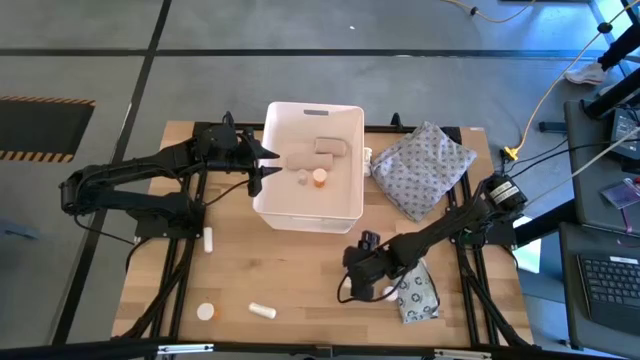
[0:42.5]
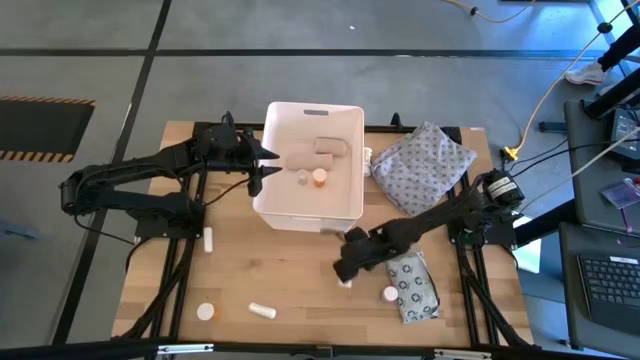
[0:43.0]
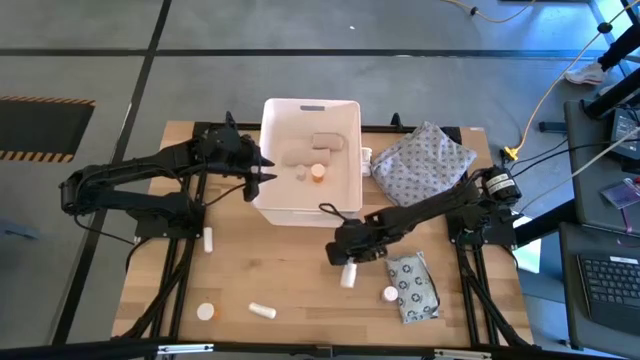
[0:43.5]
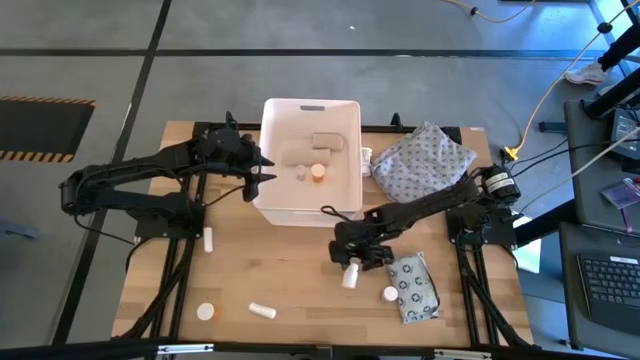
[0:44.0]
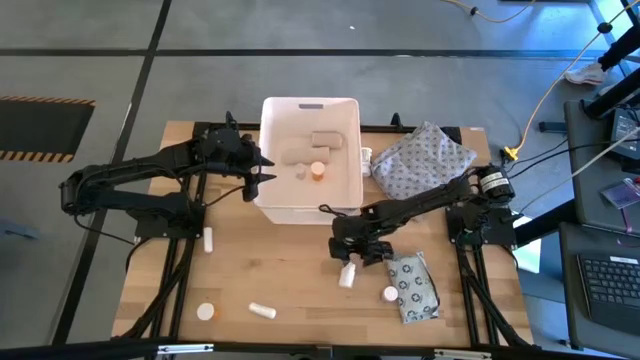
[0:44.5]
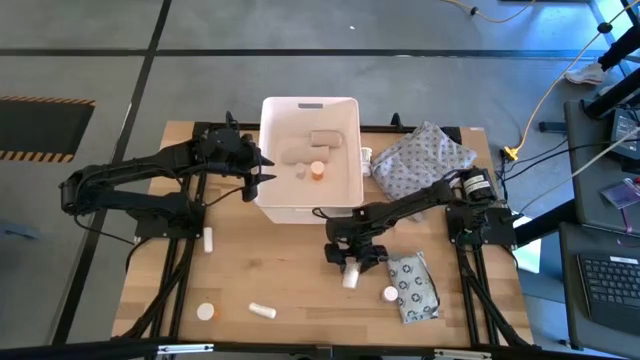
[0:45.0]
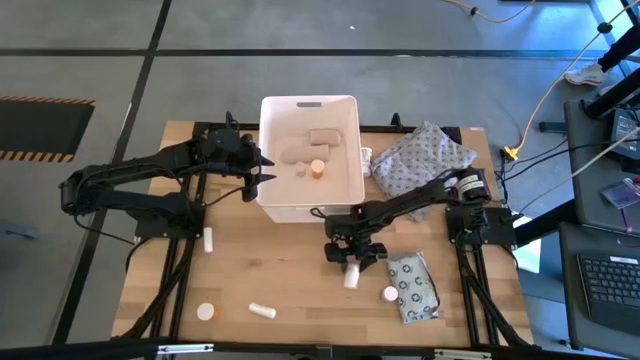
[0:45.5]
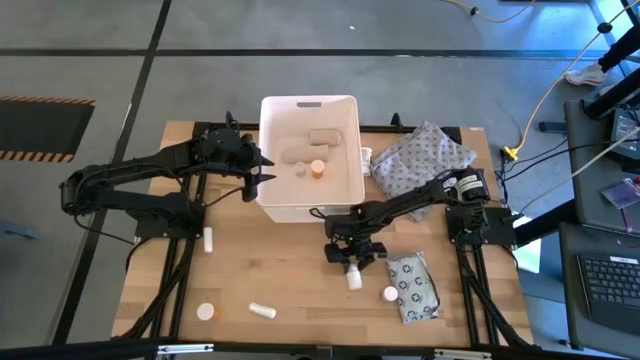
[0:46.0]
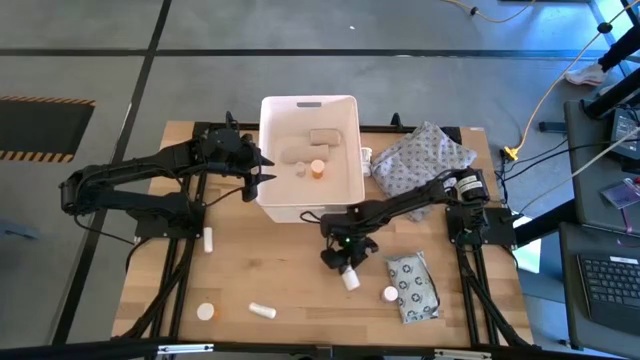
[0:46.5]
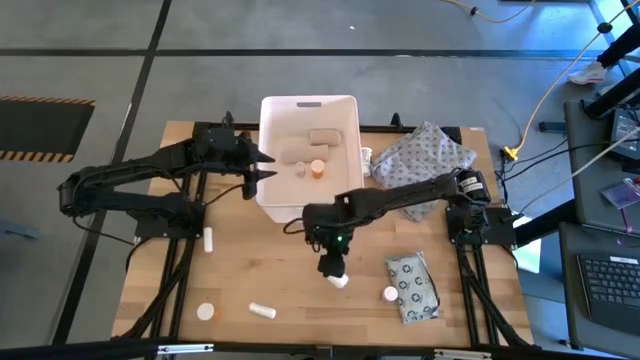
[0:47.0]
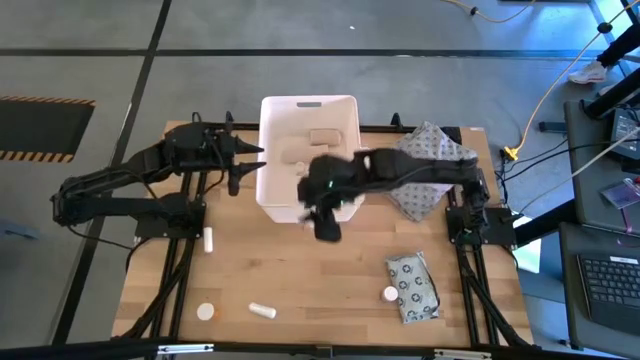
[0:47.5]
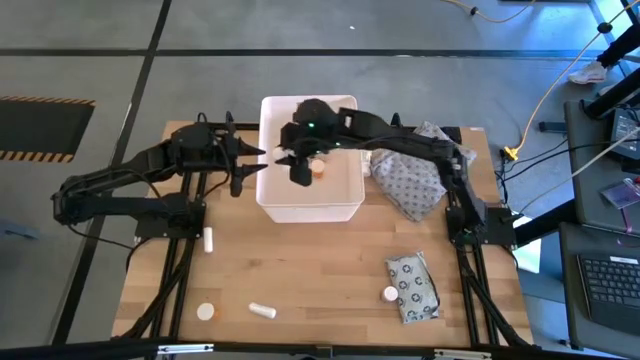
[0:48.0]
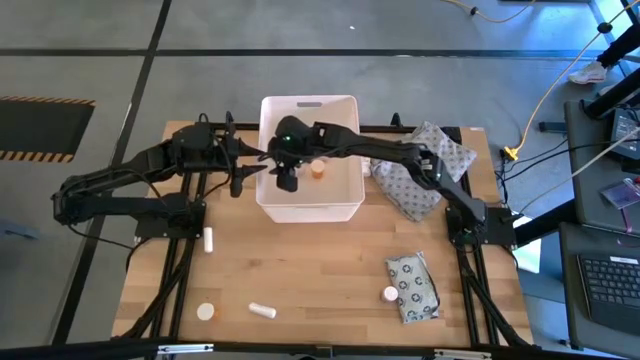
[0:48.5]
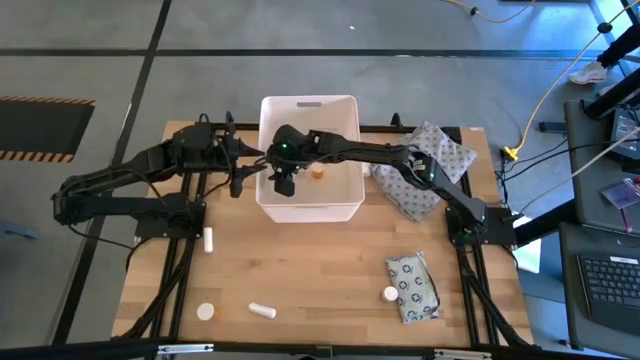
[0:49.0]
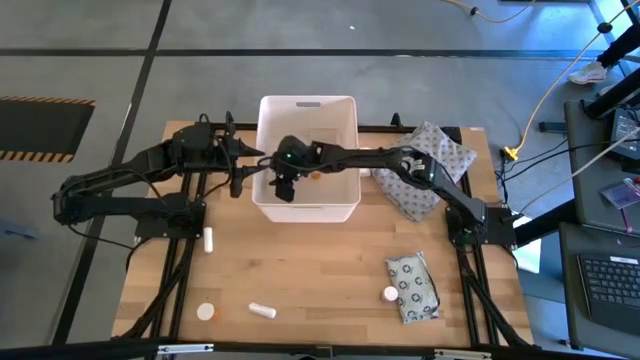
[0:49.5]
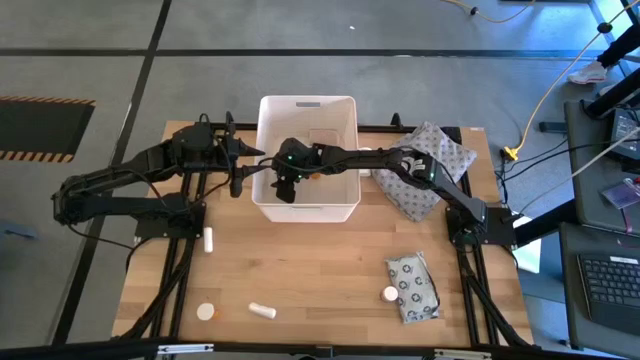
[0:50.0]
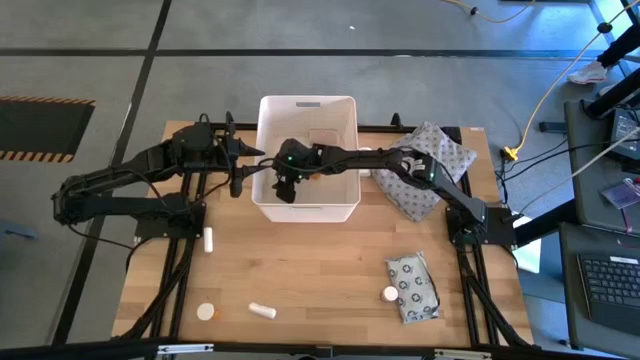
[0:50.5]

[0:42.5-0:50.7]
Task: Pick & place medical supplies in basket/bin
Put the bottom white pill bottle into the white bin

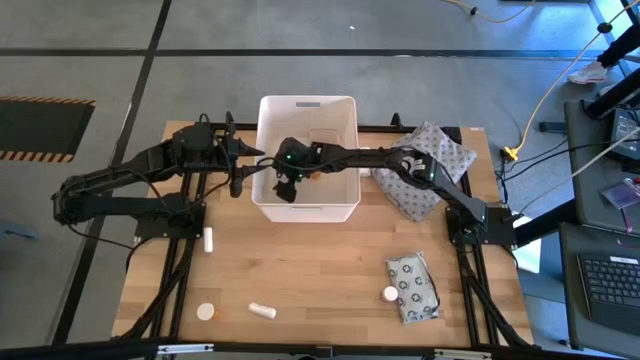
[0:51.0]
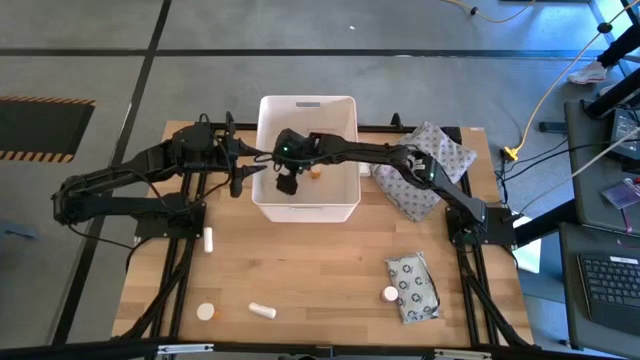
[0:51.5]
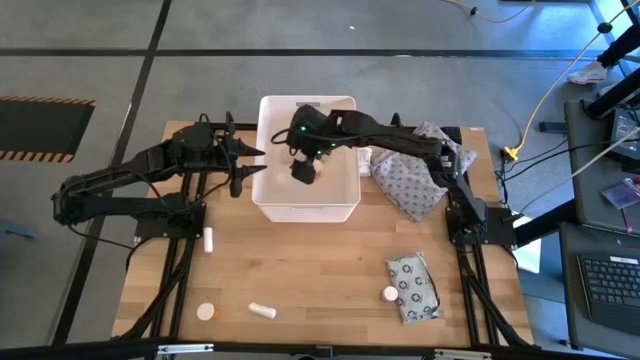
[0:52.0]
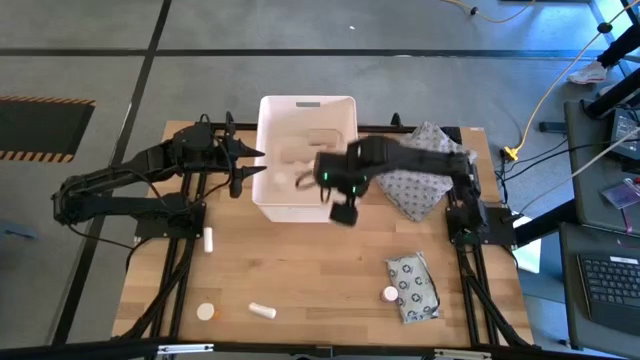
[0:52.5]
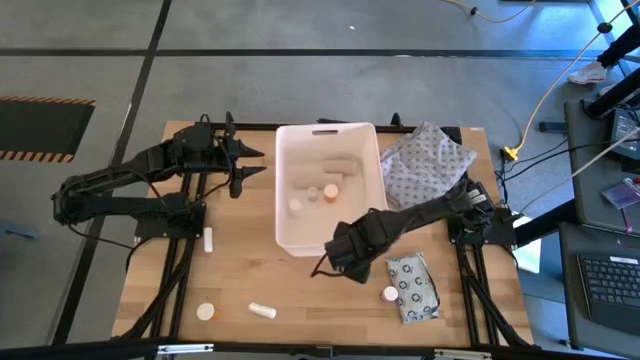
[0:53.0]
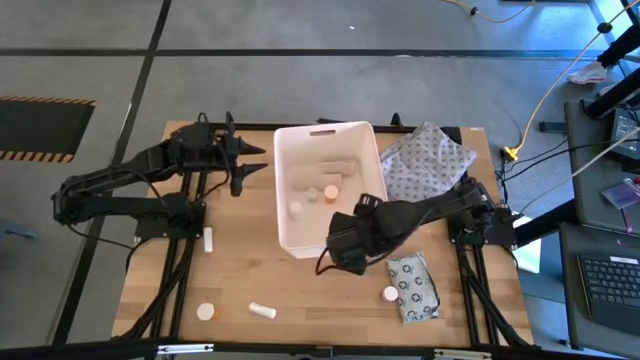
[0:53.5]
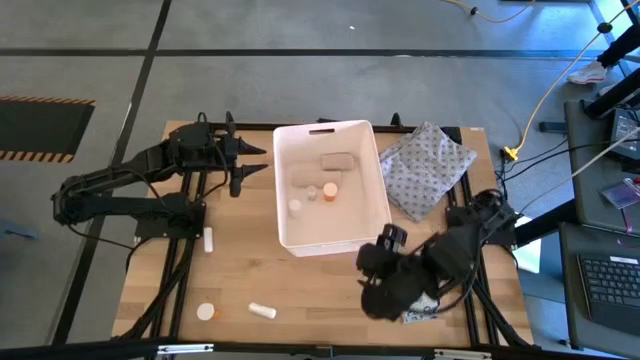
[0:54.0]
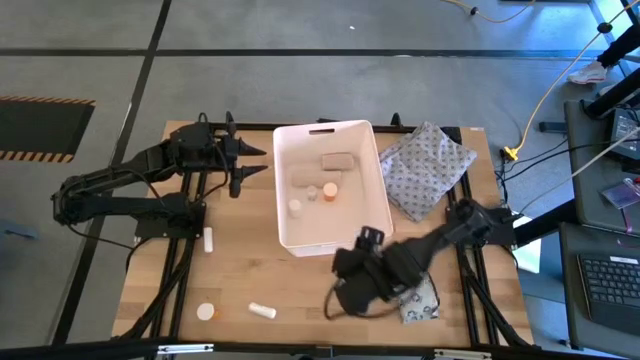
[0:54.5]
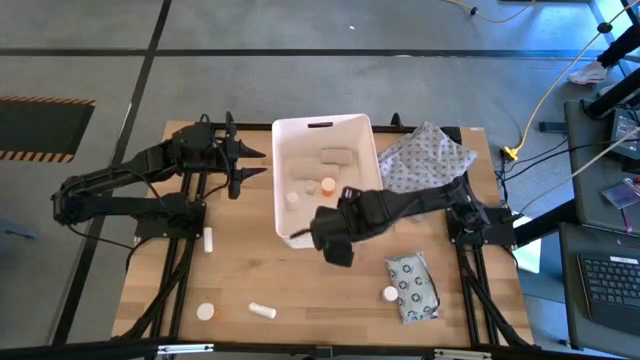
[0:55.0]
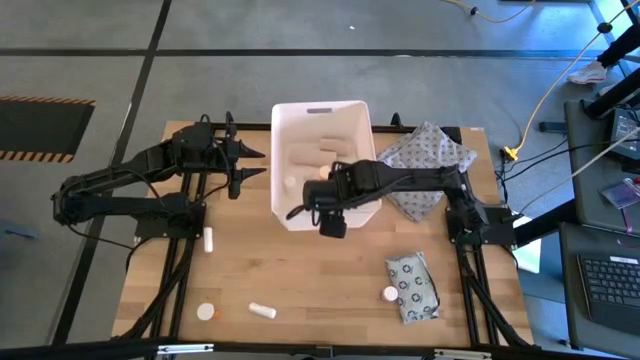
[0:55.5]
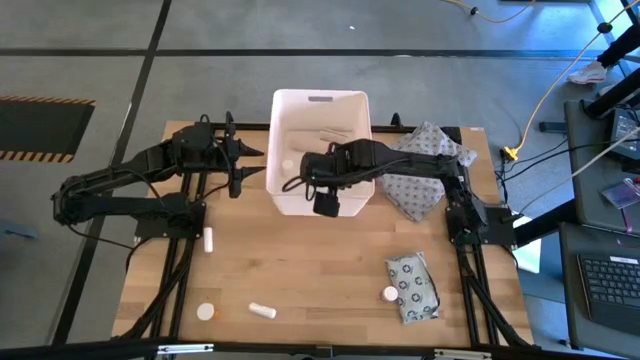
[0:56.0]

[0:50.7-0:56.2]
Adjust the white bin on the table

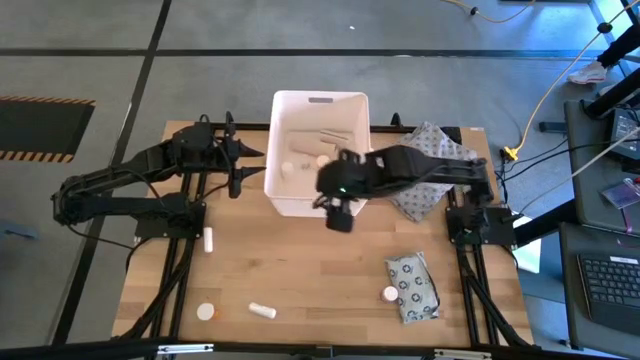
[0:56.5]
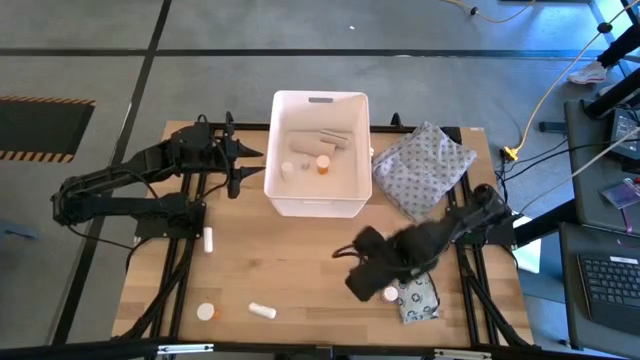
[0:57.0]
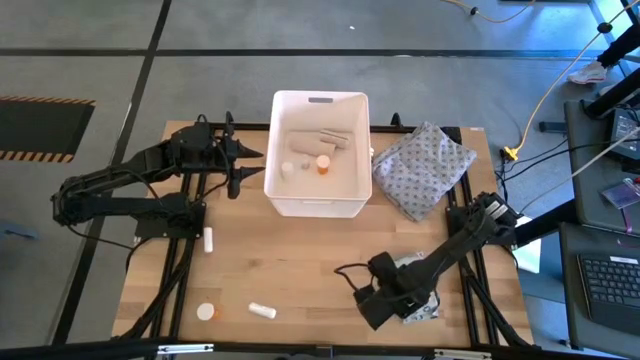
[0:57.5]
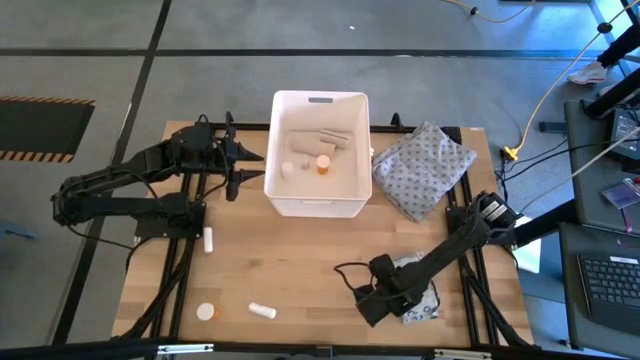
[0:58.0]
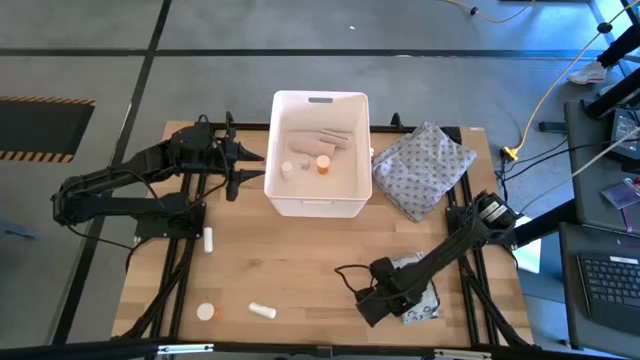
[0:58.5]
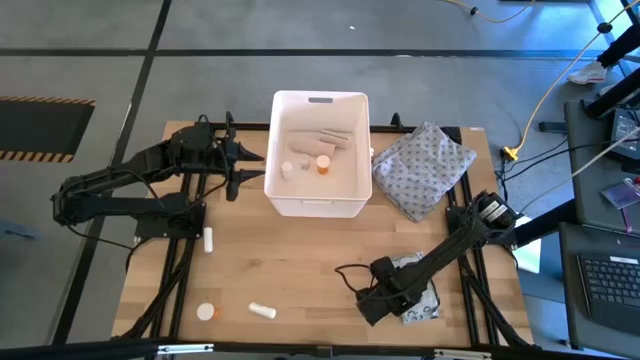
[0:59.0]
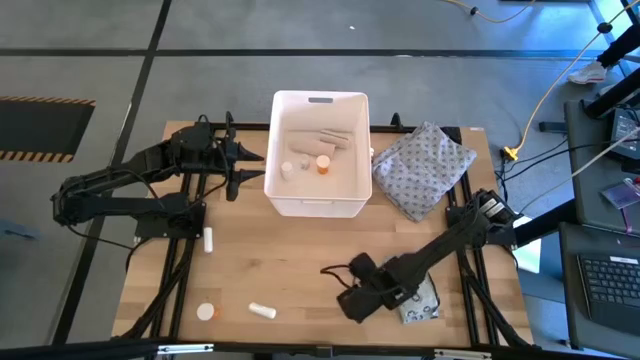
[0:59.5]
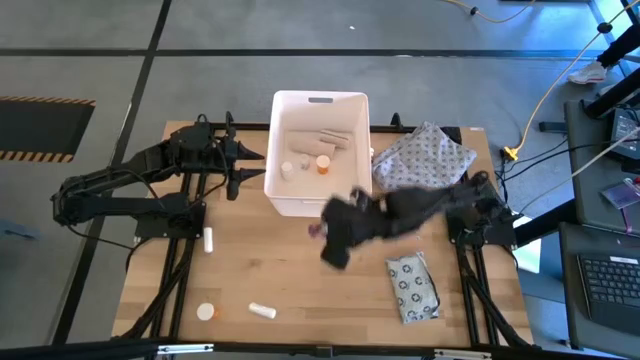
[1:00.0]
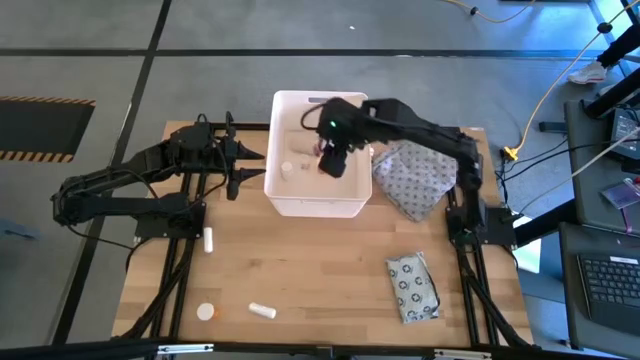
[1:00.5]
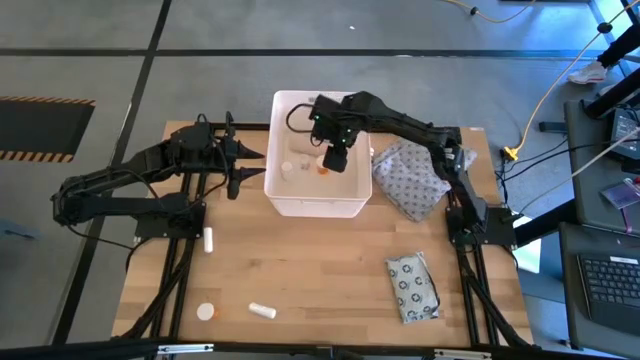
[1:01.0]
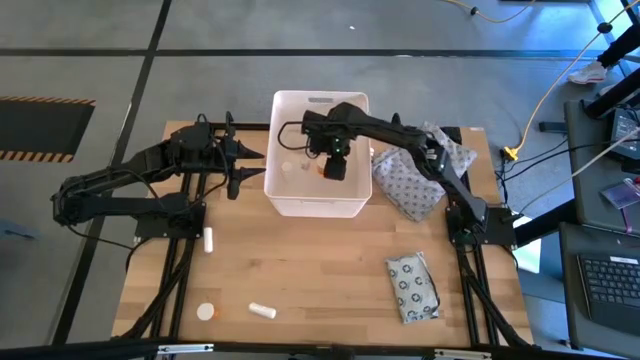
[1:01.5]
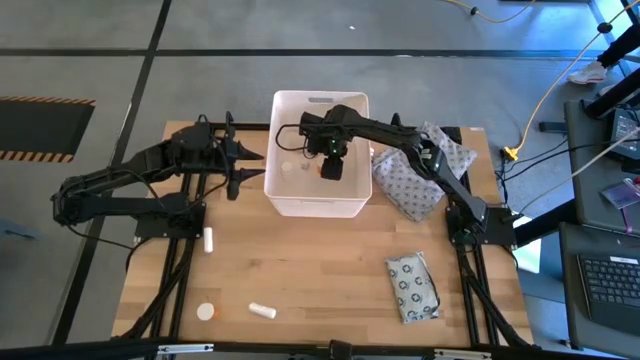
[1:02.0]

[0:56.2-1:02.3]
Put the pink pill bottle into the white bin

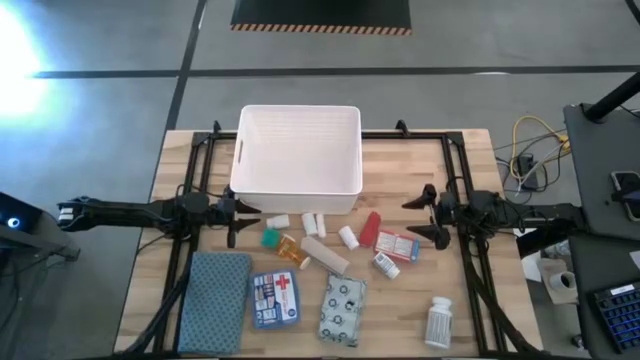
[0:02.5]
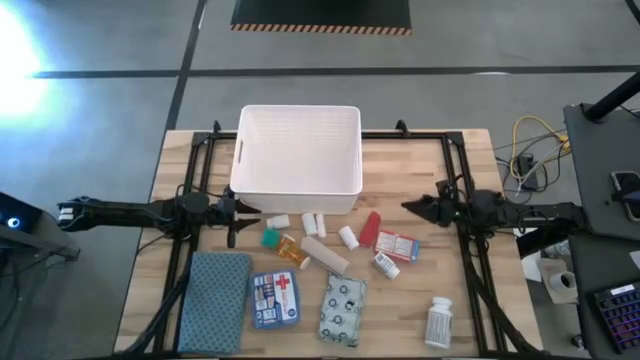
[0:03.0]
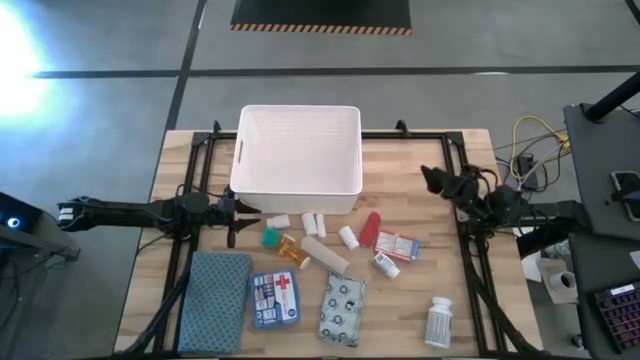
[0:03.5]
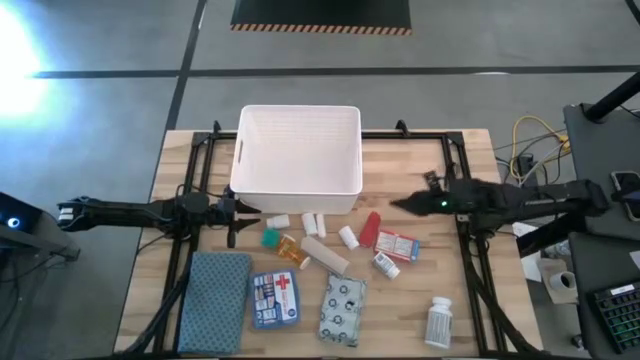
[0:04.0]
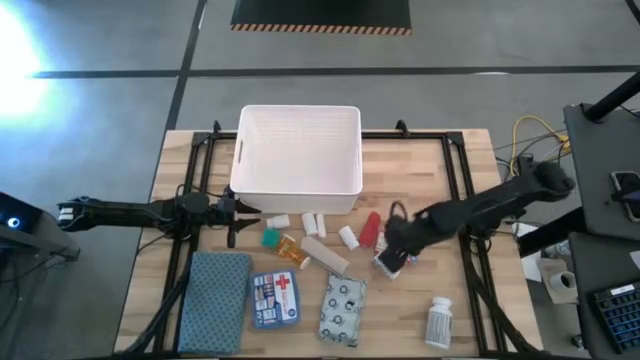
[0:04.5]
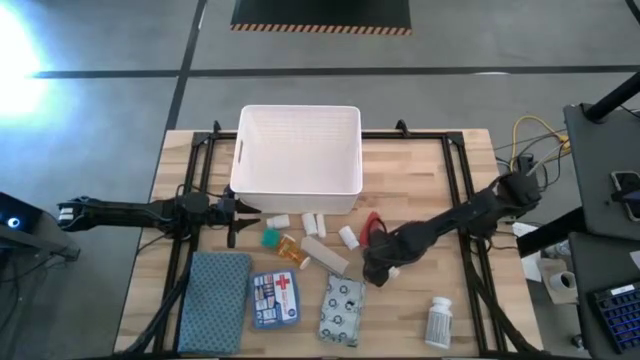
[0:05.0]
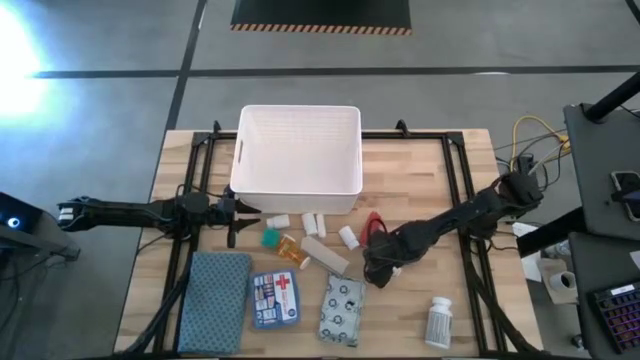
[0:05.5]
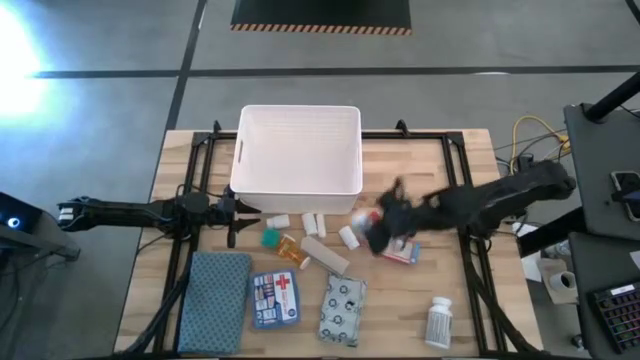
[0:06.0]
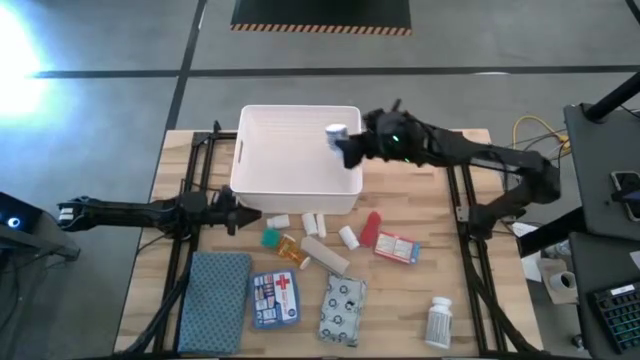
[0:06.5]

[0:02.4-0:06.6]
Task: Pick & place medical supplies in basket/bin
Put the white blue pill bottle into the white bin
